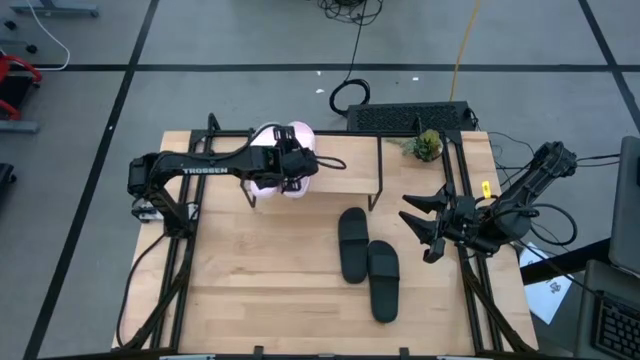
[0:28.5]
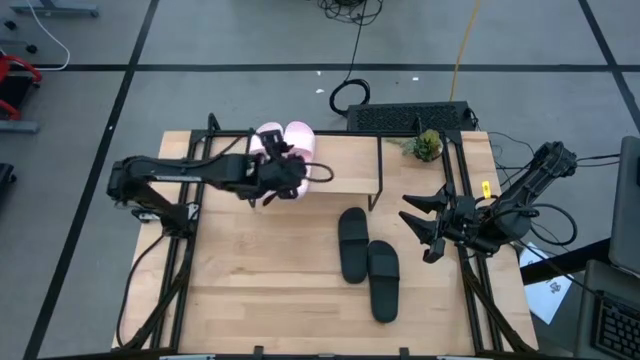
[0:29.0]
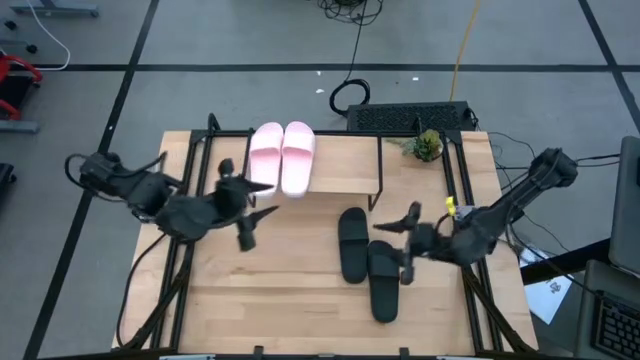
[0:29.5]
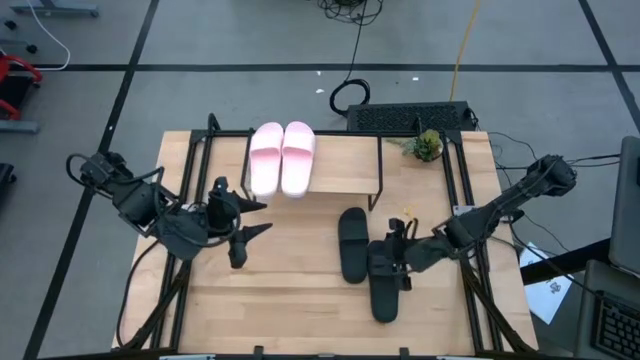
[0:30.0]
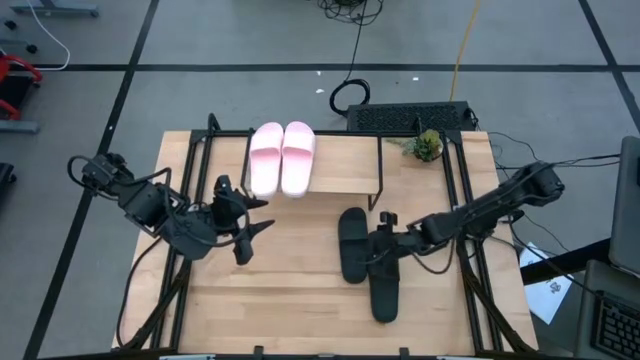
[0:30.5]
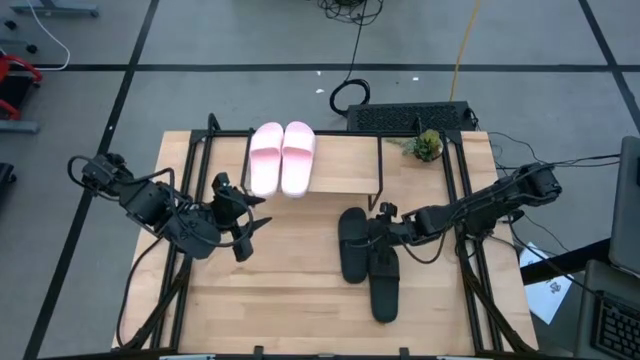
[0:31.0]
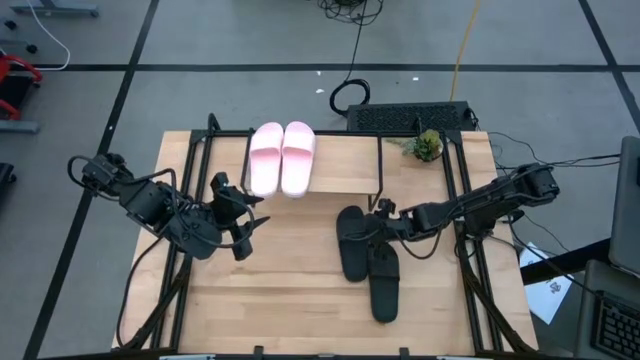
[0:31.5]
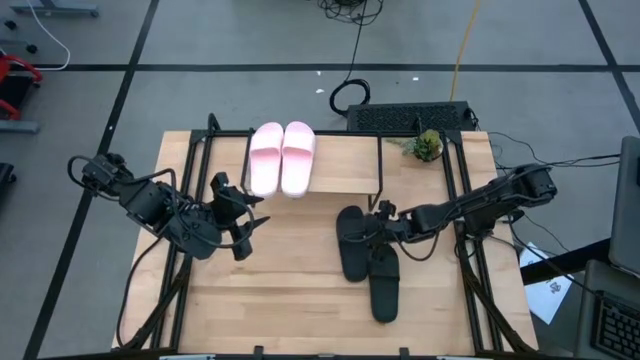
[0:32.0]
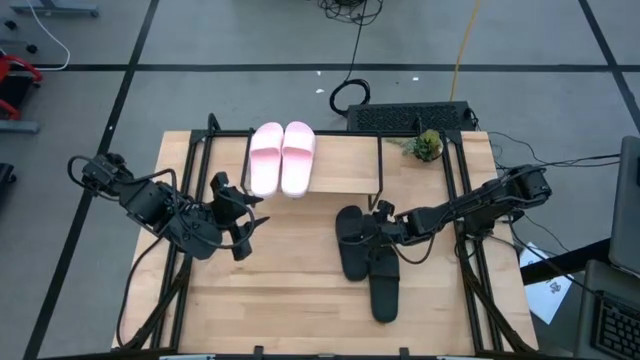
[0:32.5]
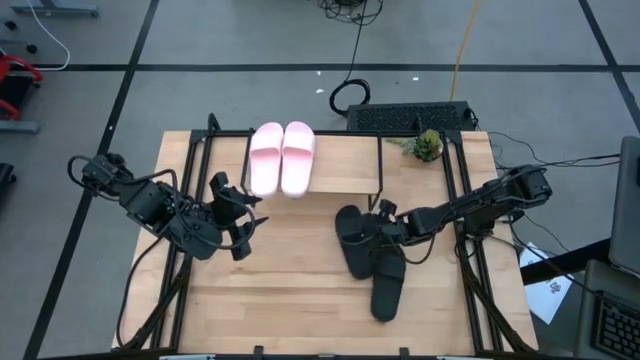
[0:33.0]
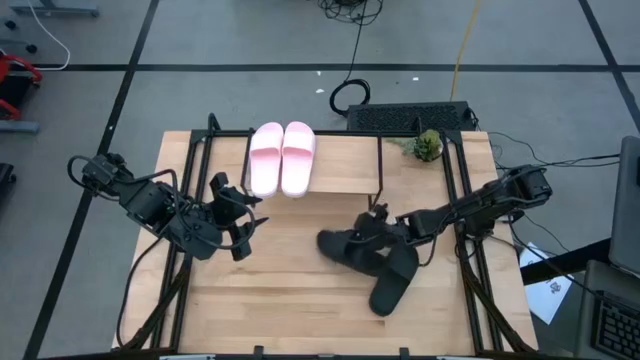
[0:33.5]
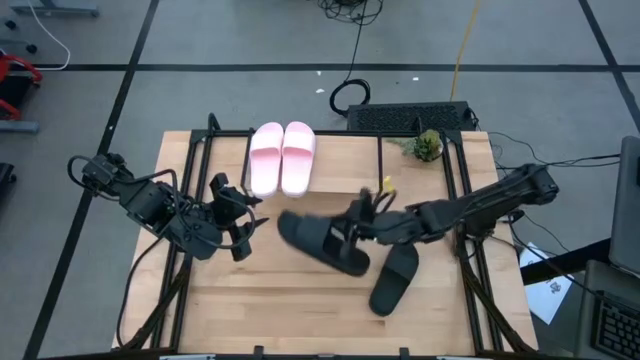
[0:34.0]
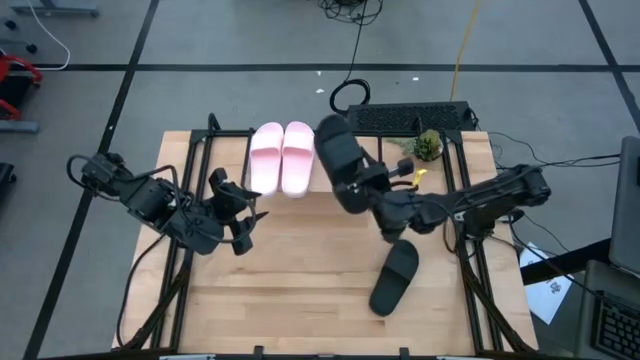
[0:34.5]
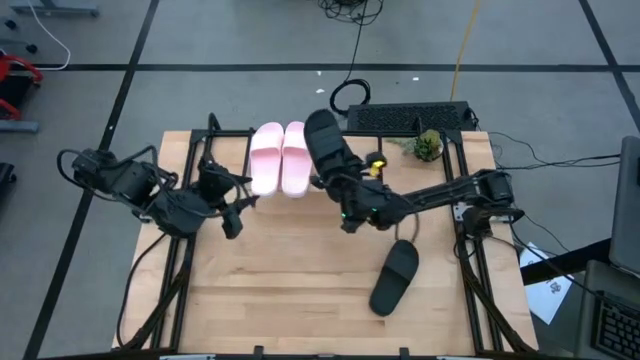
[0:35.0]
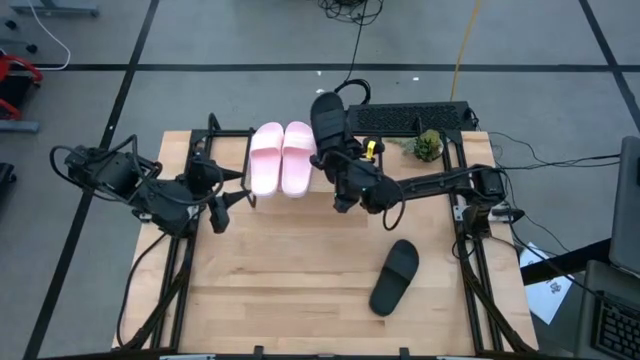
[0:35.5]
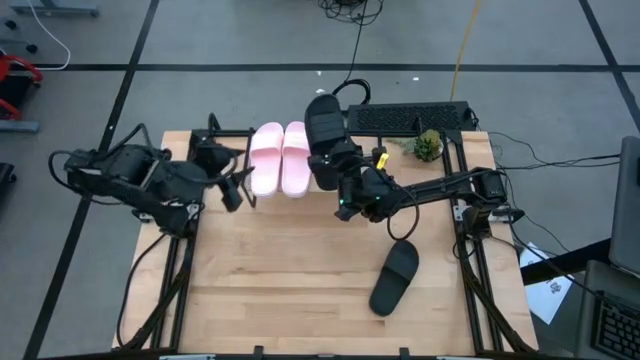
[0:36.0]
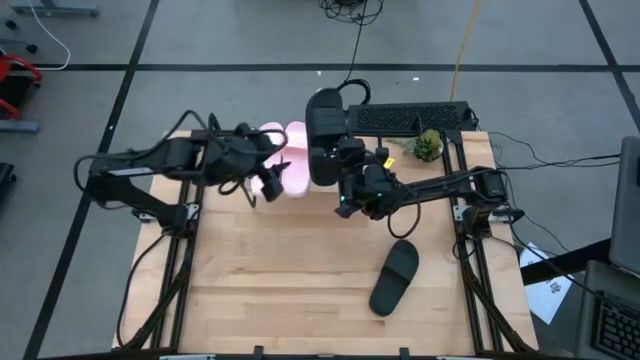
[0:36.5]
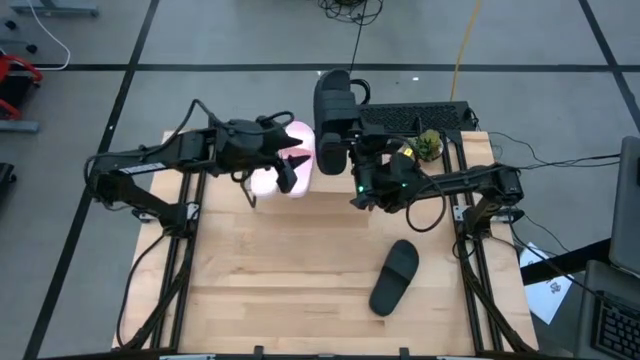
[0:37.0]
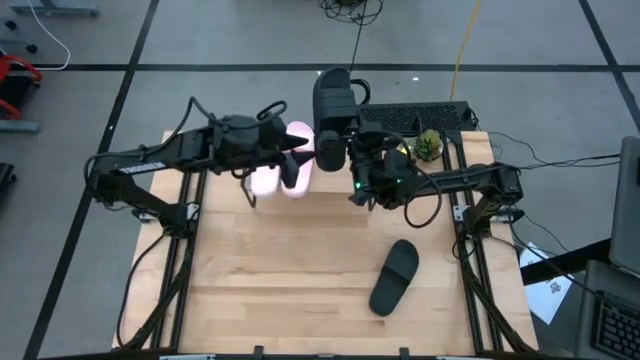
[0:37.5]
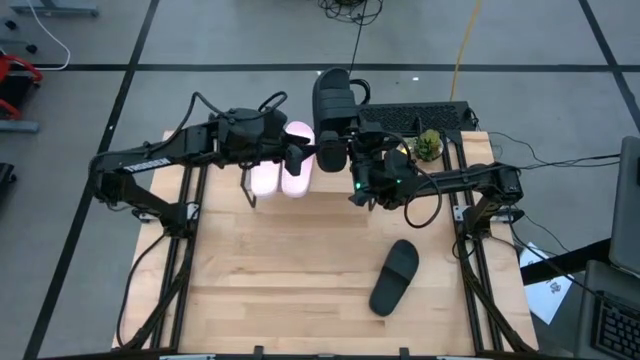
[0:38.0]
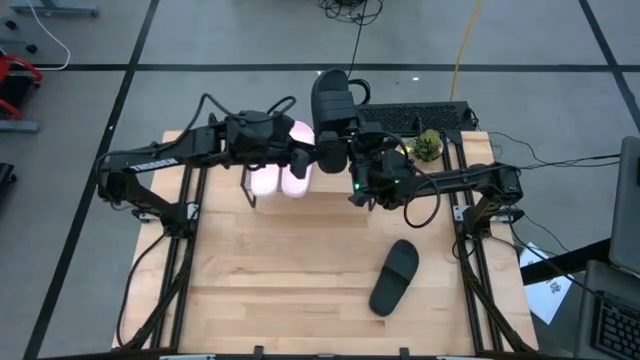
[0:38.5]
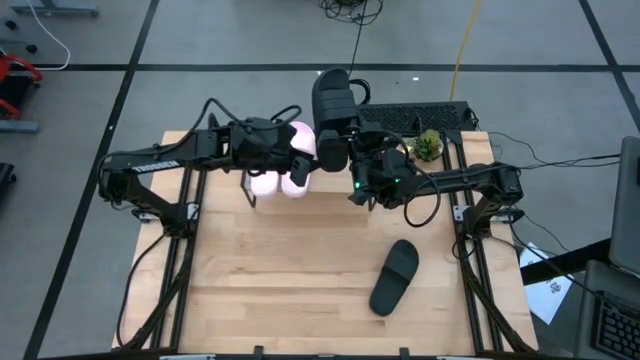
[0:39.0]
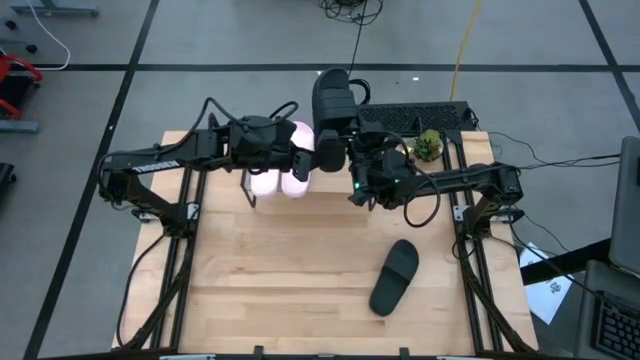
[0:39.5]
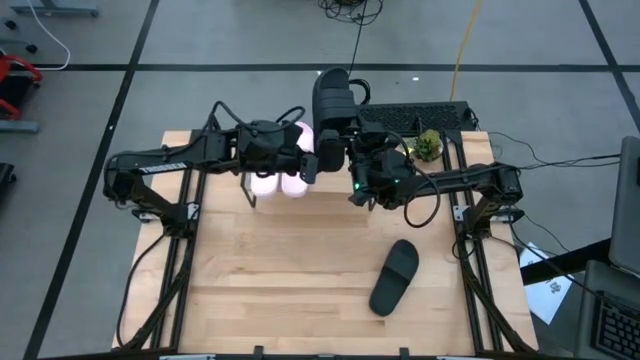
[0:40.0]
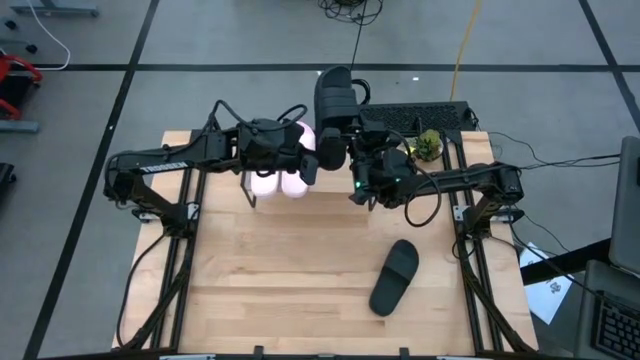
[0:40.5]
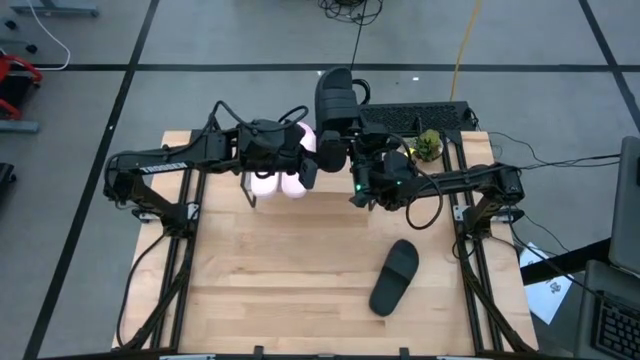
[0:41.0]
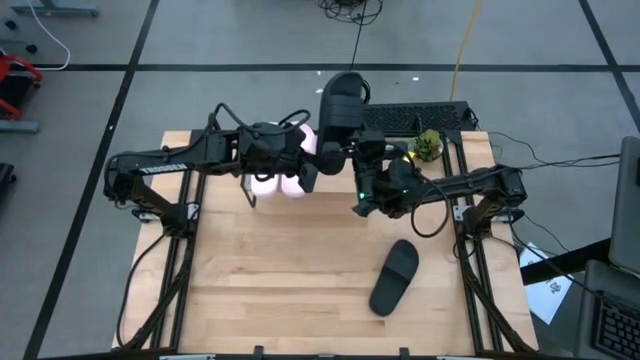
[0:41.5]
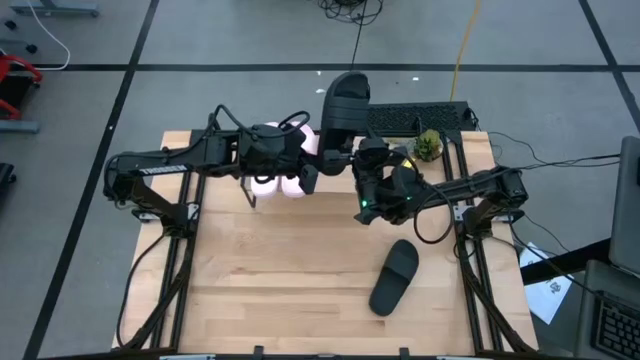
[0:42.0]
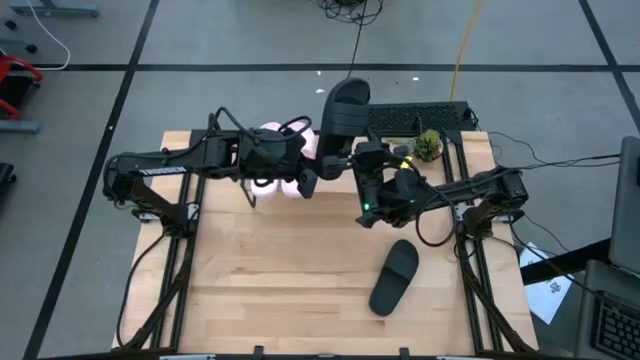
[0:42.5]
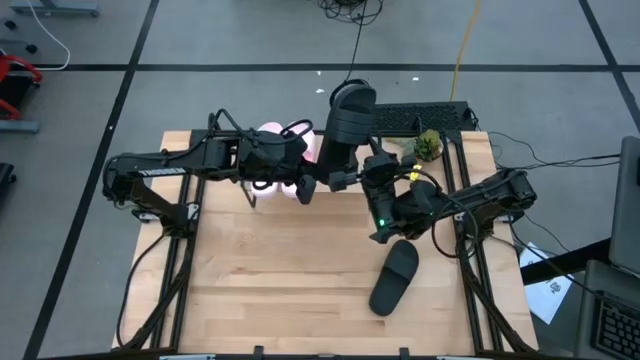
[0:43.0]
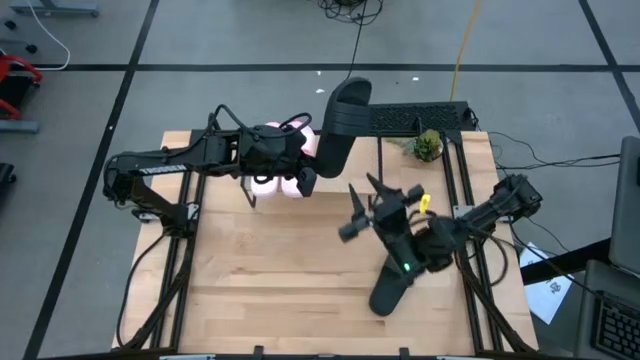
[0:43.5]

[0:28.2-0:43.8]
Task: Pick and place slides into the shelf
Put the left black slides on the shelf

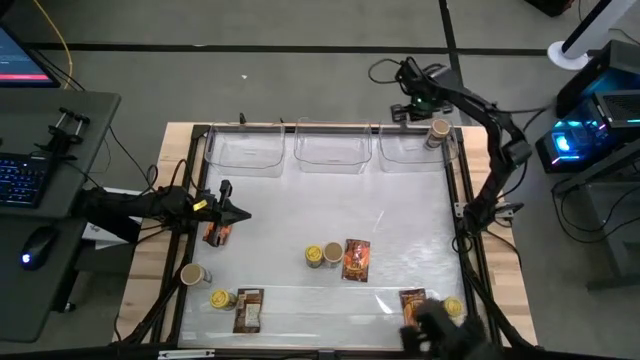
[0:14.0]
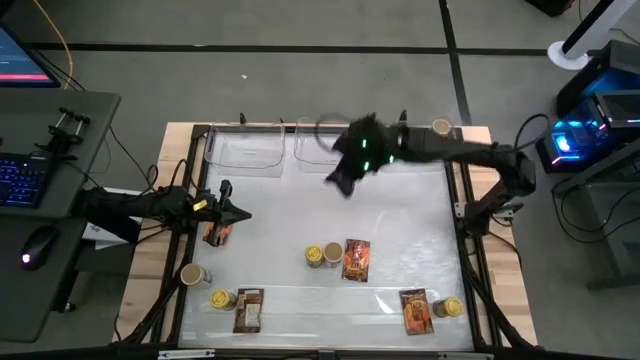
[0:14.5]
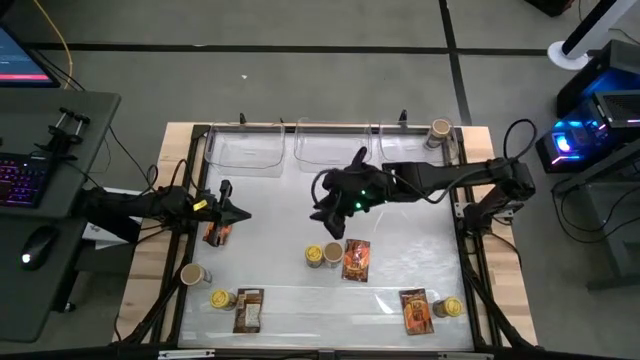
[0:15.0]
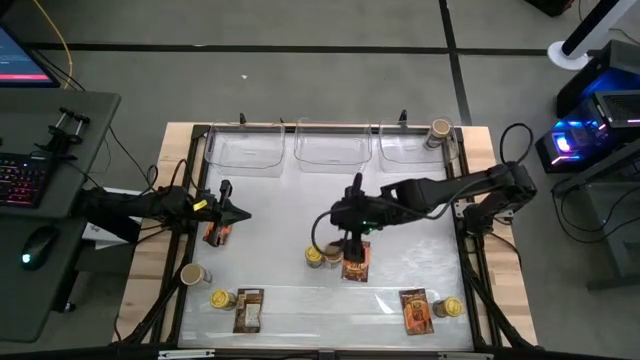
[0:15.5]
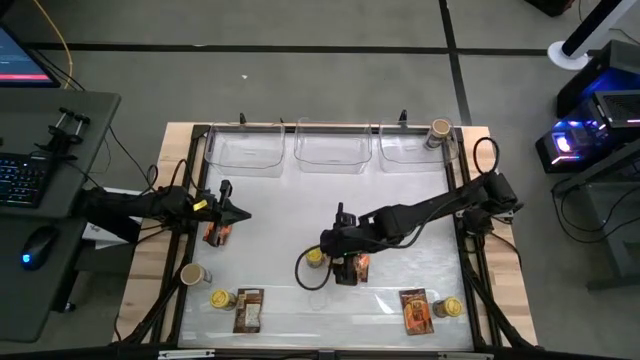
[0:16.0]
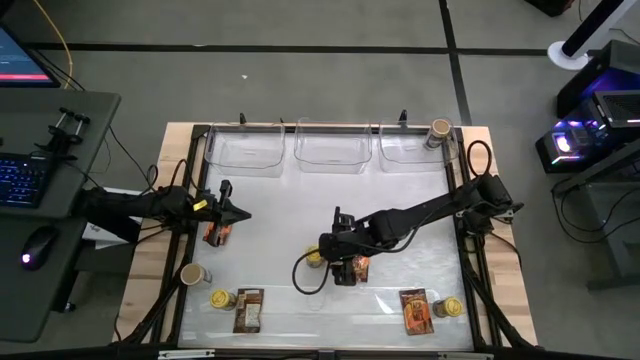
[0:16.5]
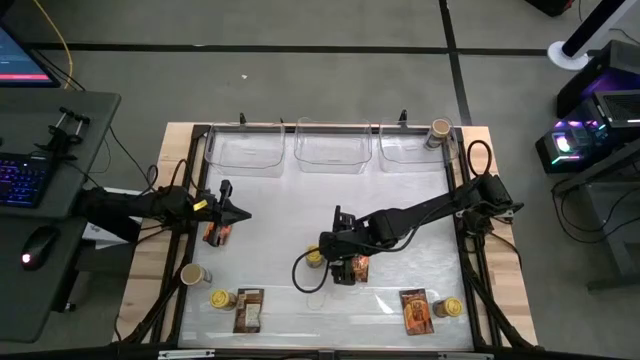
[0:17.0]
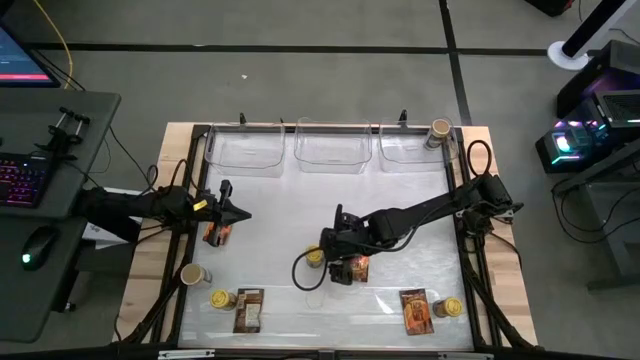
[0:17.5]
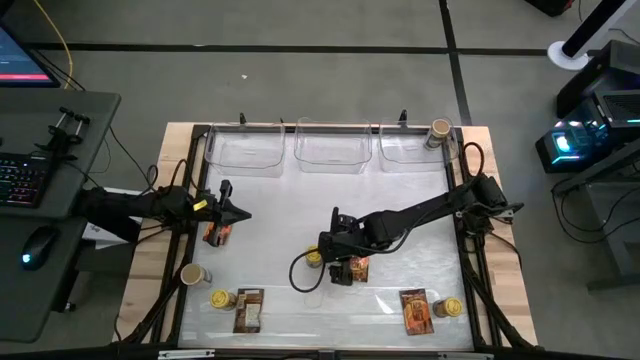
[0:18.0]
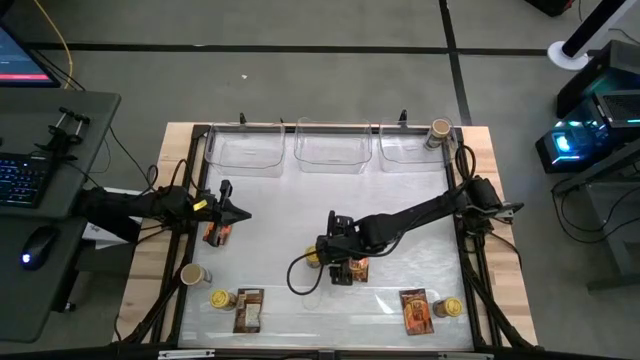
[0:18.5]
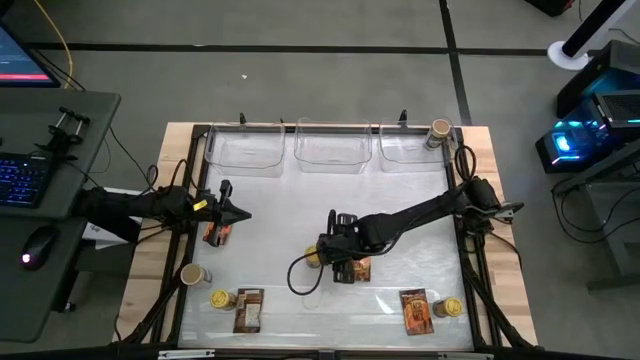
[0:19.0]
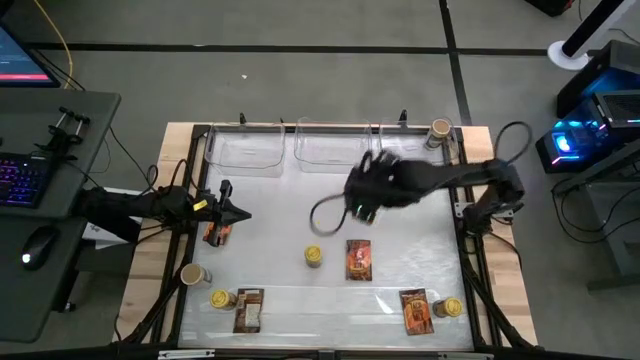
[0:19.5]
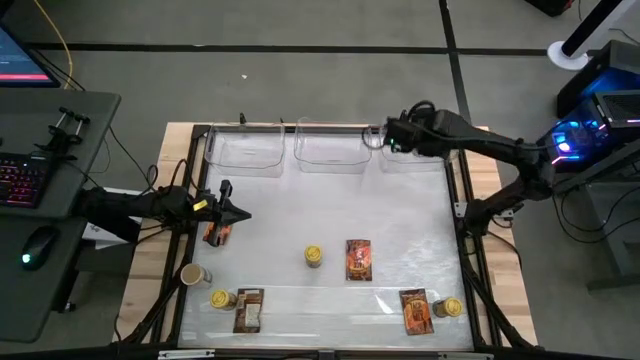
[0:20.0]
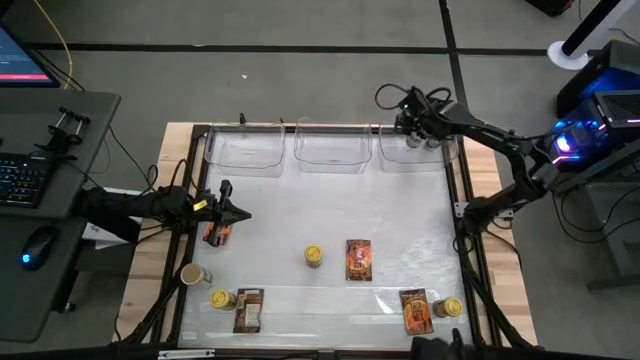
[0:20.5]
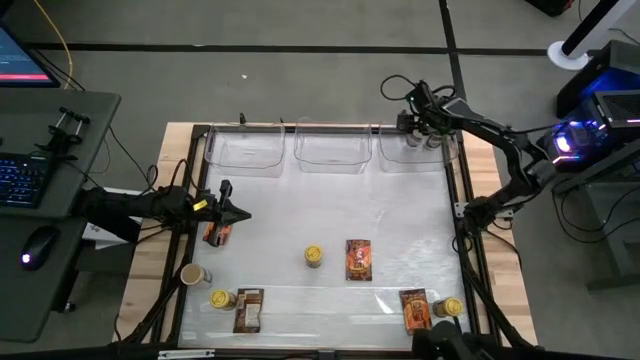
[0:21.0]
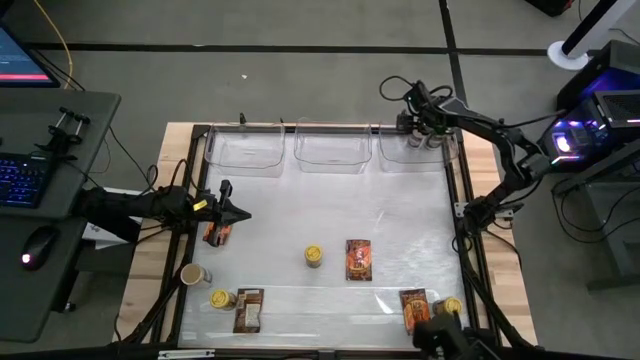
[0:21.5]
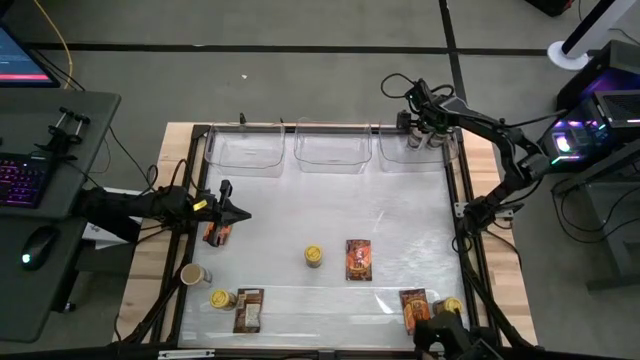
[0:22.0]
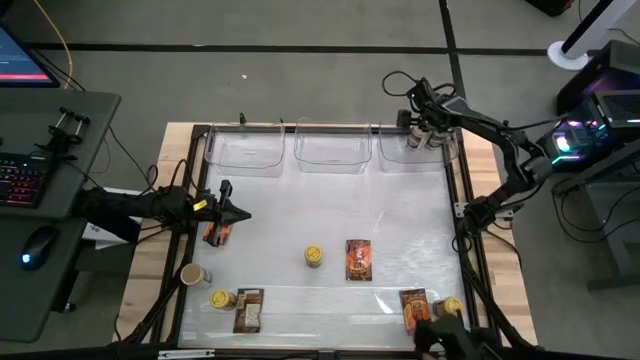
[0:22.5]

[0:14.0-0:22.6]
Task: Sort spices by type
Put the right gold seasoning bottle into the right transparent bin
